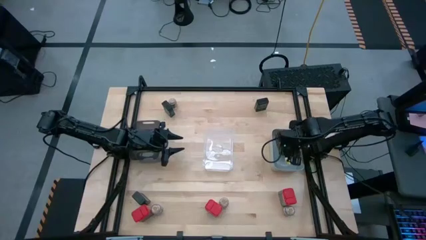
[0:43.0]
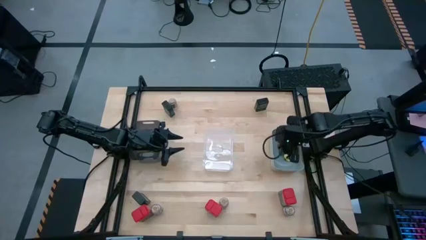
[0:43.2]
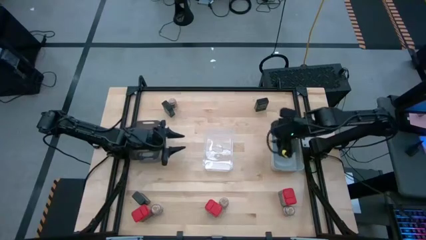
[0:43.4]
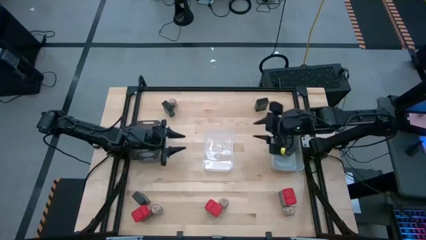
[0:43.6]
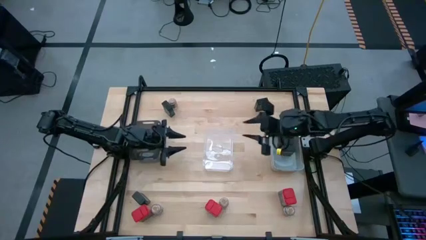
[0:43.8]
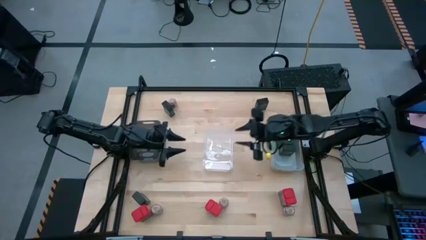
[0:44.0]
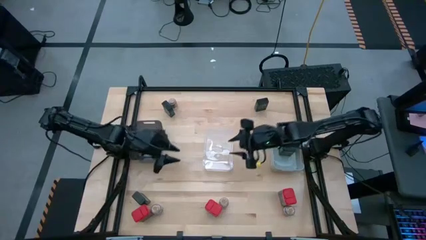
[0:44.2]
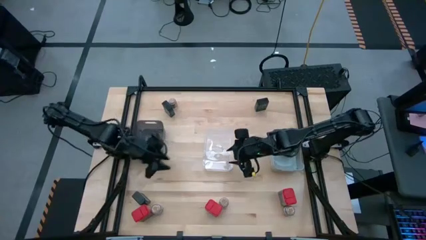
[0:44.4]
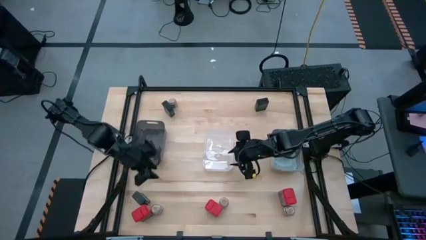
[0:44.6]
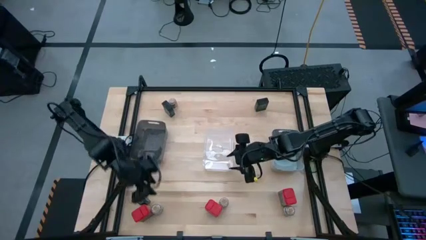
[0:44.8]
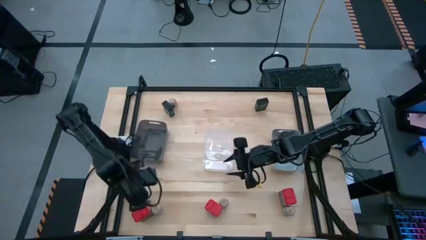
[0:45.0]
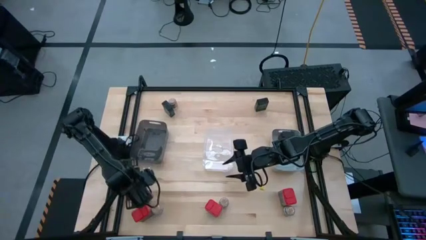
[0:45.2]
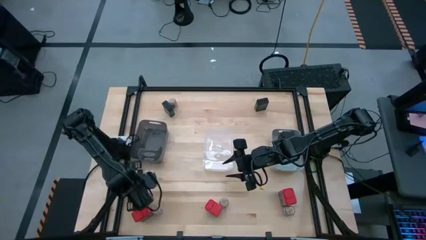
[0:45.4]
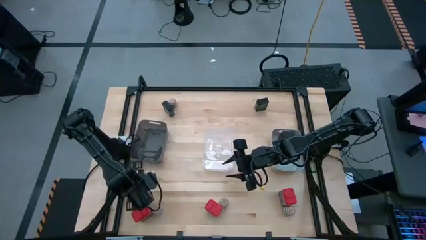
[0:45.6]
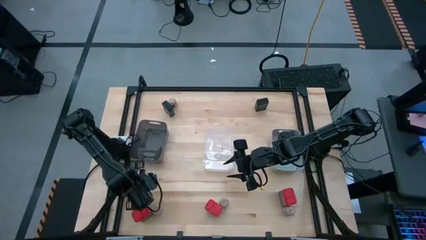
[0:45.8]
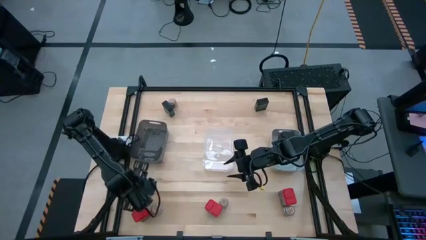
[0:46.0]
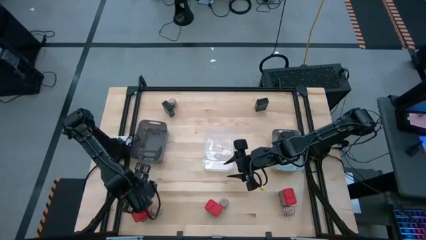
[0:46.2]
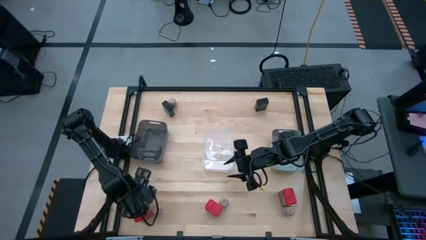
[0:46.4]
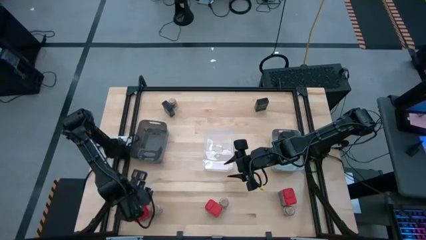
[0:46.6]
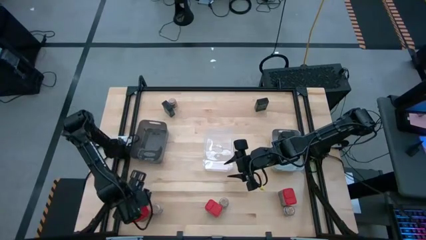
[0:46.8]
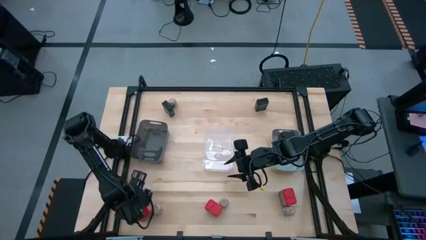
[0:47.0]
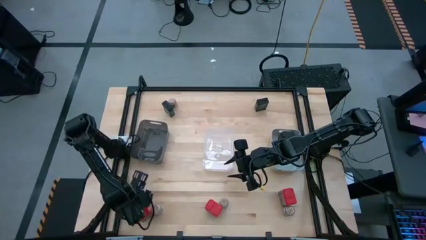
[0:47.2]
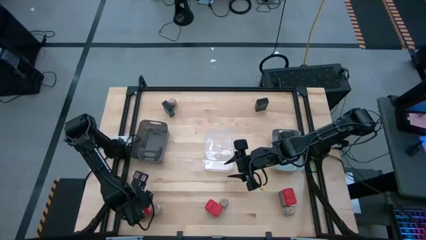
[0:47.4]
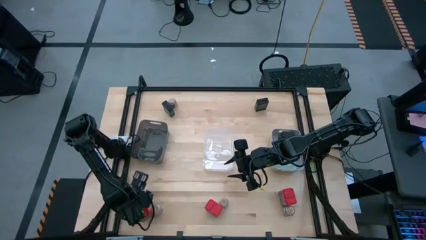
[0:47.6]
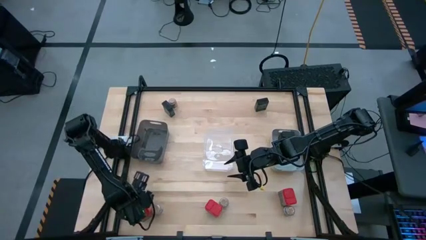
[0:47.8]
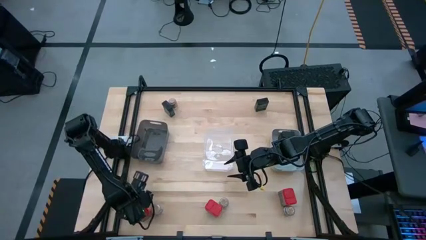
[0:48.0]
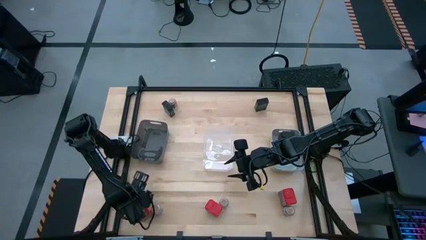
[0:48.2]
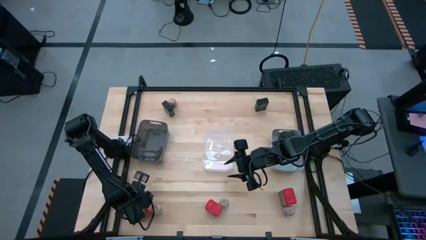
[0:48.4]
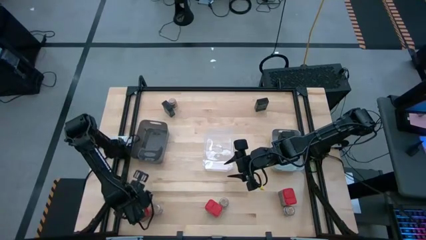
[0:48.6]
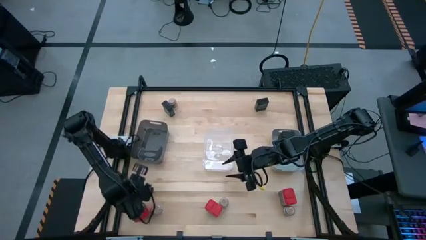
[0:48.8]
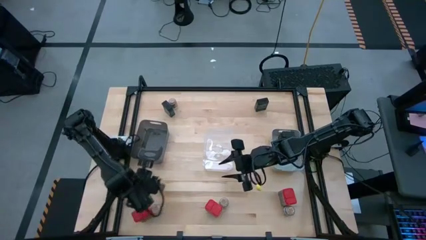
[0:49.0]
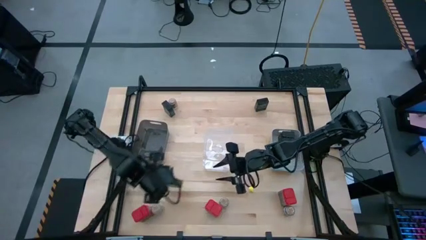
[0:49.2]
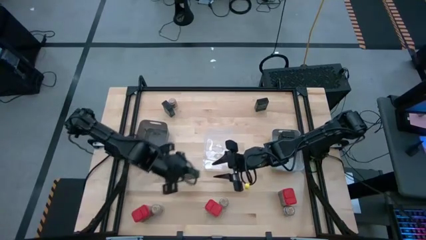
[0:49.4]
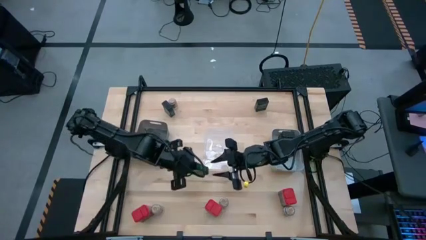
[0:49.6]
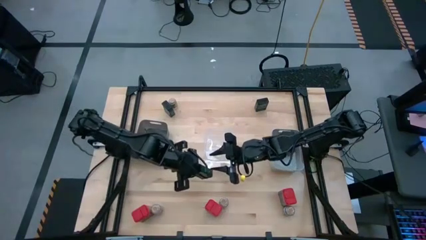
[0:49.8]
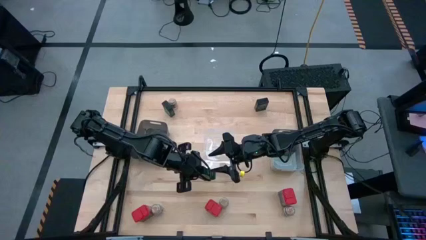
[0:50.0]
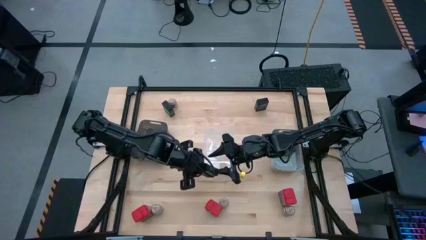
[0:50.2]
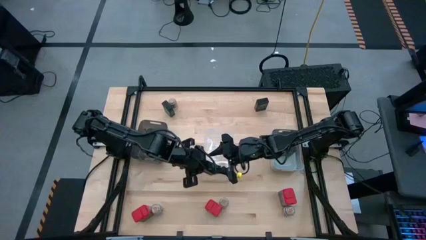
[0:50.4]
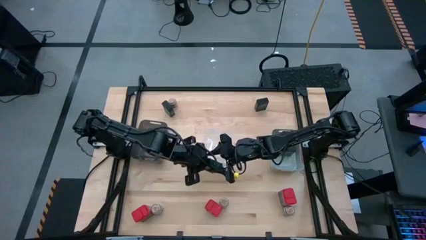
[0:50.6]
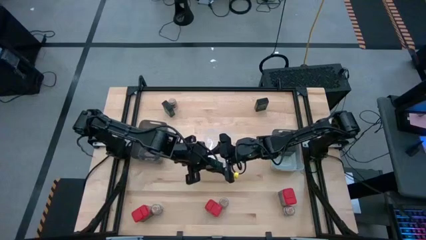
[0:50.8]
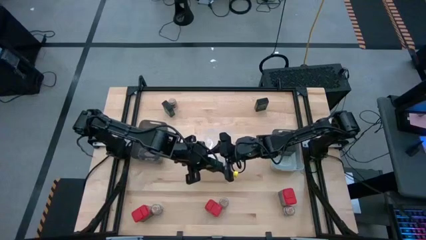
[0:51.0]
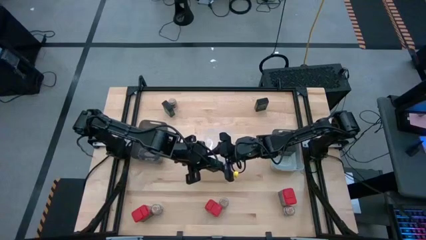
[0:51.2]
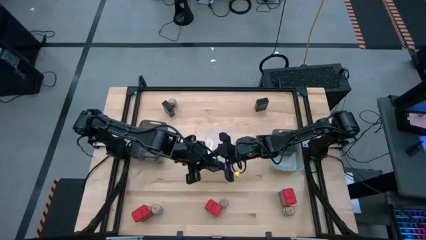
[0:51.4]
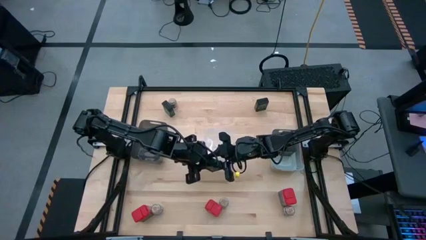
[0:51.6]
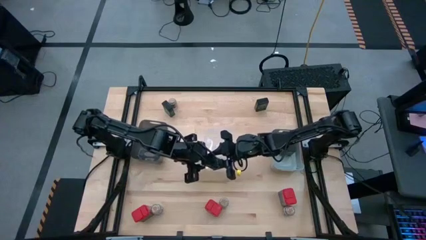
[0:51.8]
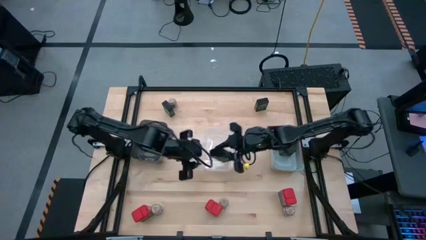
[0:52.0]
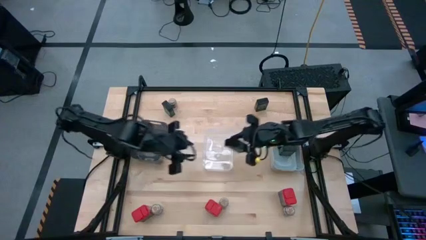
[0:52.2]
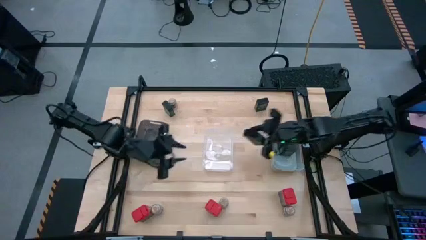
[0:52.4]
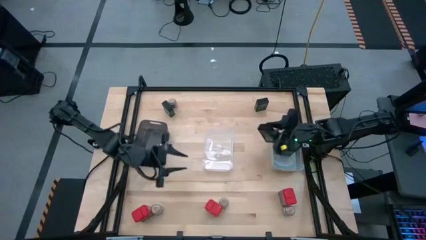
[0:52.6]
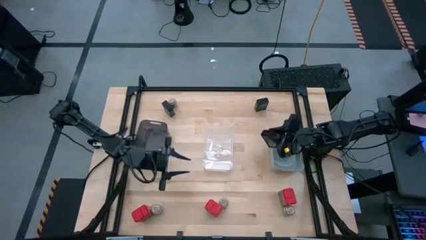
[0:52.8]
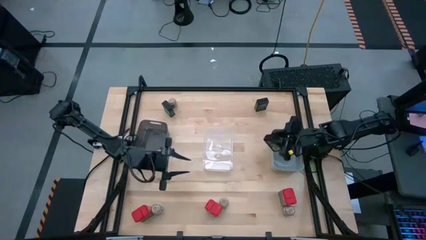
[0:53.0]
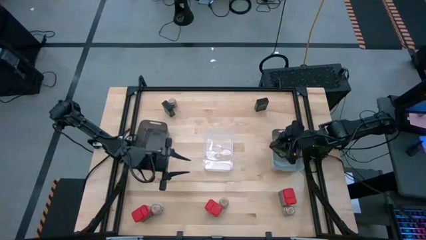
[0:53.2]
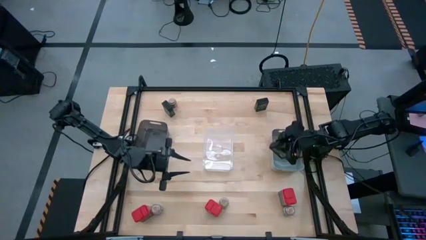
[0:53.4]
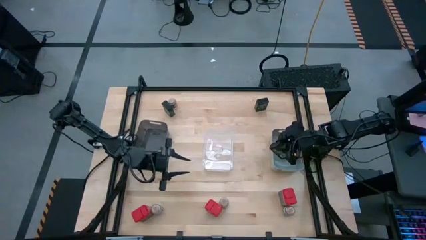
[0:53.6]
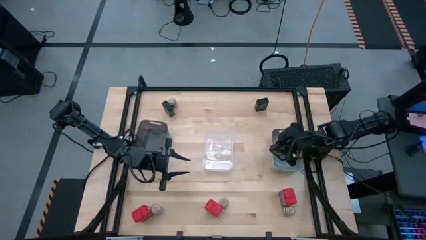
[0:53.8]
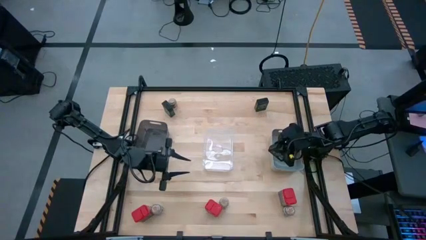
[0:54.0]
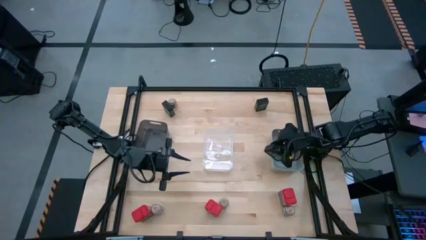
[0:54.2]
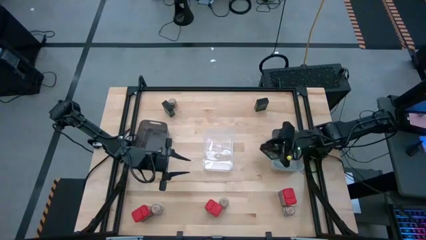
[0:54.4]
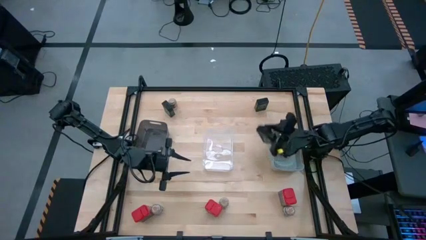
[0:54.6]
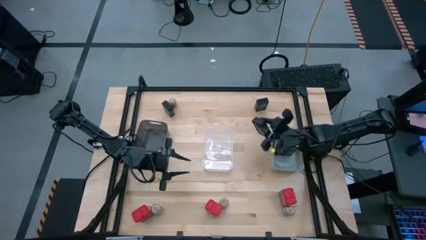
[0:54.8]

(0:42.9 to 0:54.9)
Task: Sort spices by type
Put the black seasoning can into the gray bin
